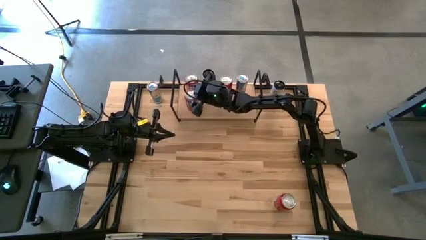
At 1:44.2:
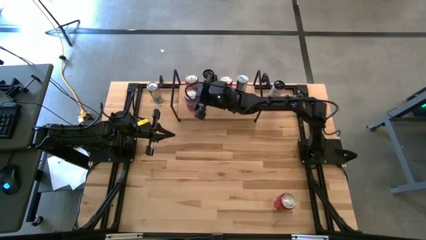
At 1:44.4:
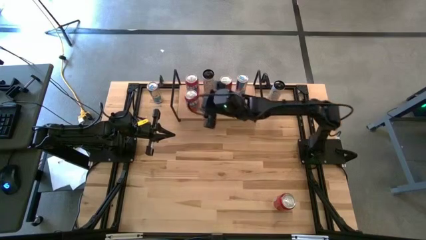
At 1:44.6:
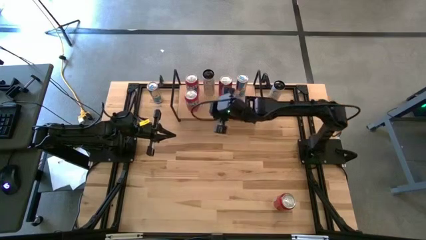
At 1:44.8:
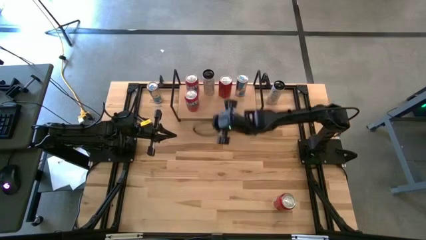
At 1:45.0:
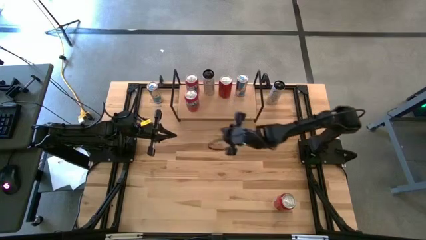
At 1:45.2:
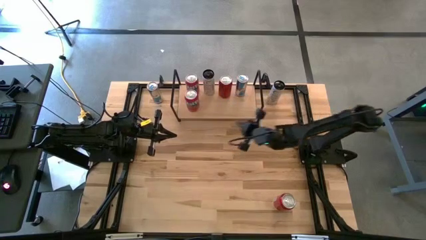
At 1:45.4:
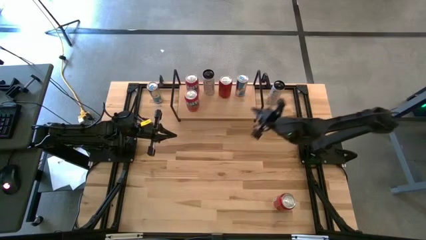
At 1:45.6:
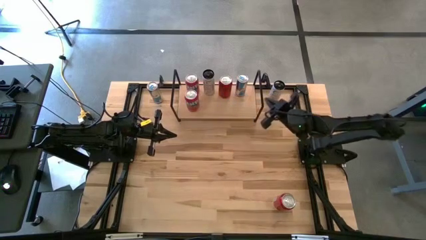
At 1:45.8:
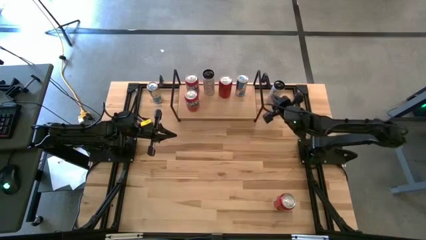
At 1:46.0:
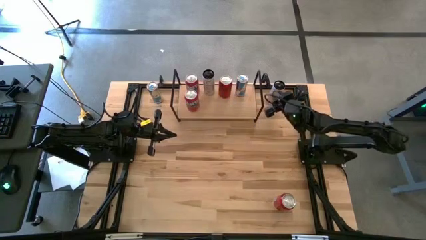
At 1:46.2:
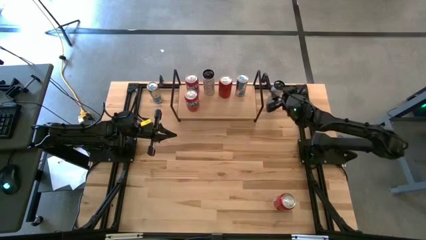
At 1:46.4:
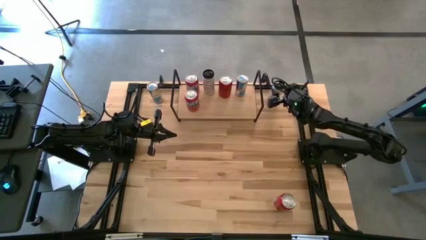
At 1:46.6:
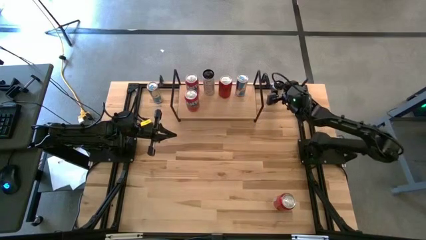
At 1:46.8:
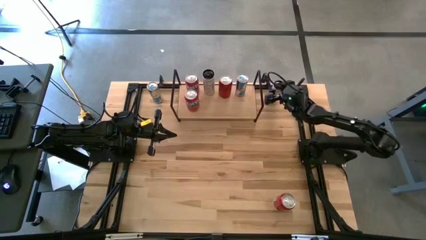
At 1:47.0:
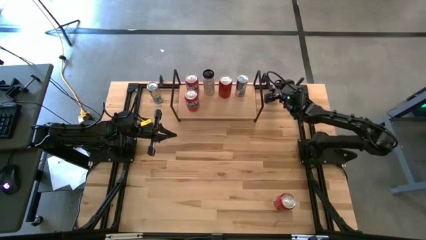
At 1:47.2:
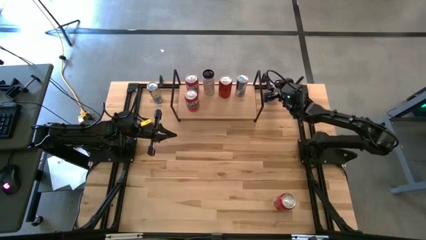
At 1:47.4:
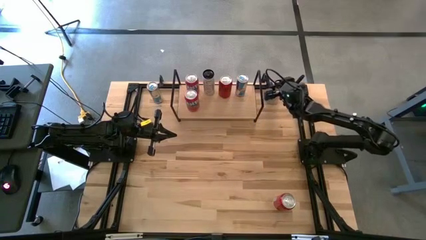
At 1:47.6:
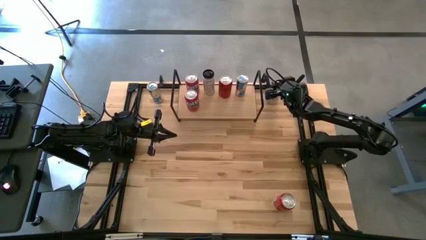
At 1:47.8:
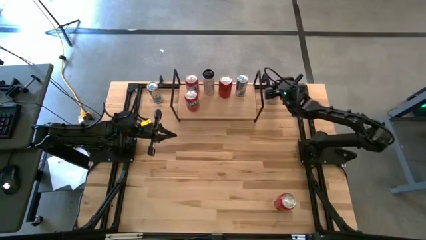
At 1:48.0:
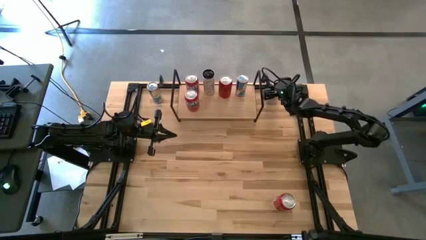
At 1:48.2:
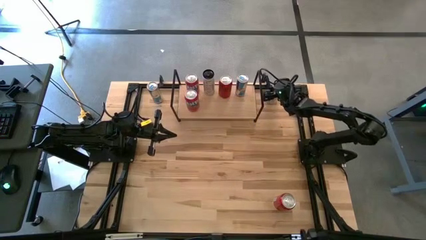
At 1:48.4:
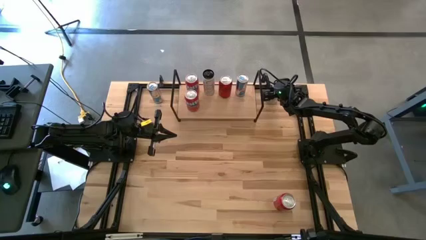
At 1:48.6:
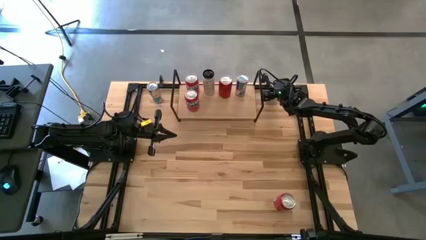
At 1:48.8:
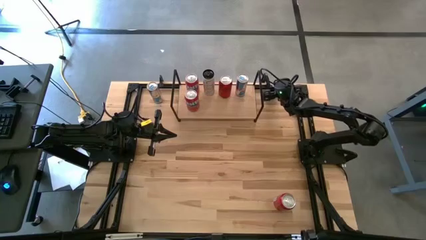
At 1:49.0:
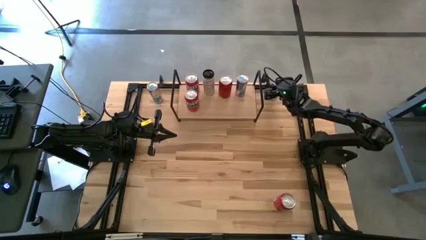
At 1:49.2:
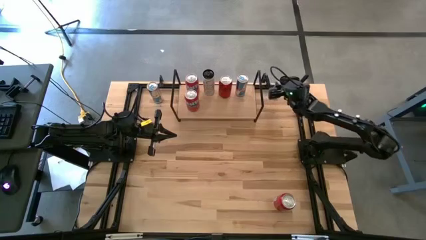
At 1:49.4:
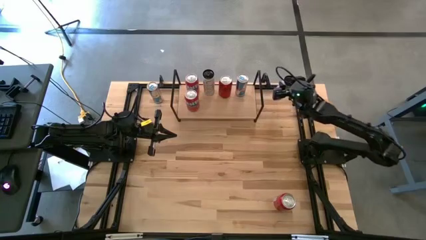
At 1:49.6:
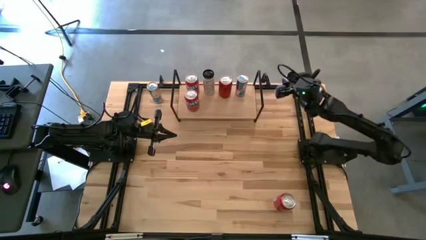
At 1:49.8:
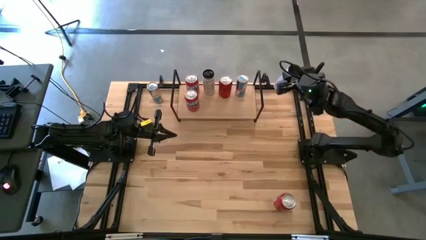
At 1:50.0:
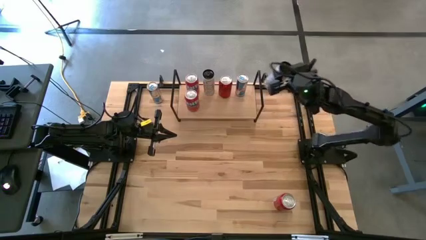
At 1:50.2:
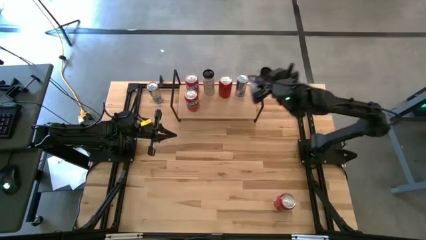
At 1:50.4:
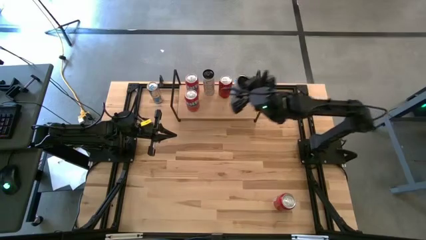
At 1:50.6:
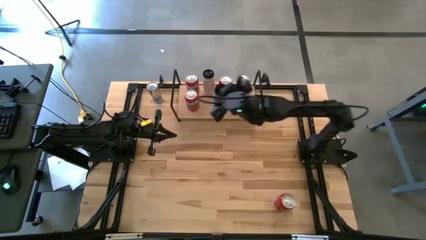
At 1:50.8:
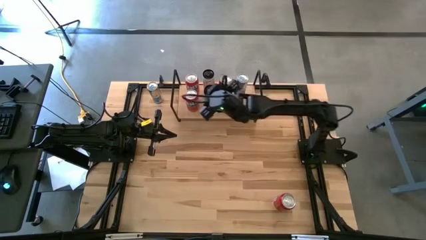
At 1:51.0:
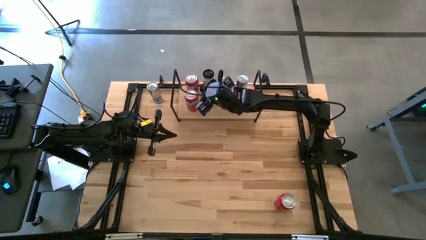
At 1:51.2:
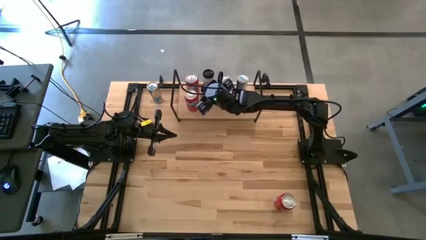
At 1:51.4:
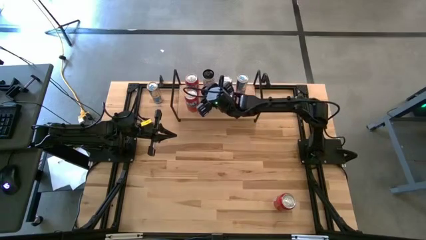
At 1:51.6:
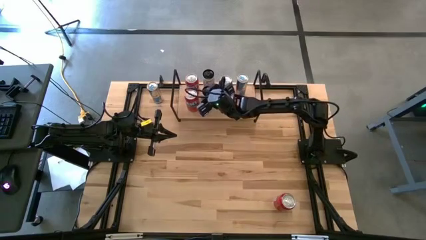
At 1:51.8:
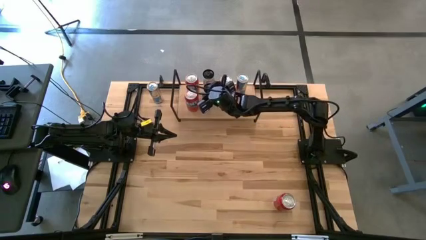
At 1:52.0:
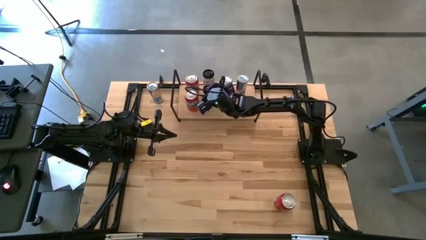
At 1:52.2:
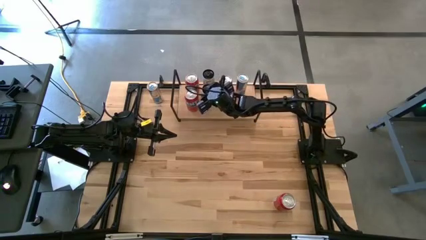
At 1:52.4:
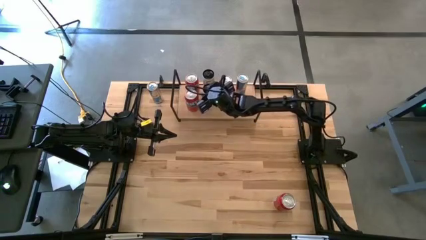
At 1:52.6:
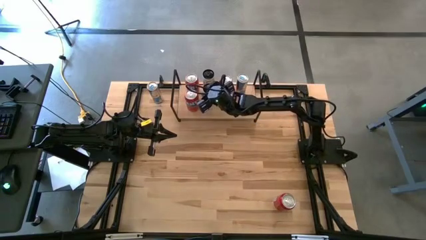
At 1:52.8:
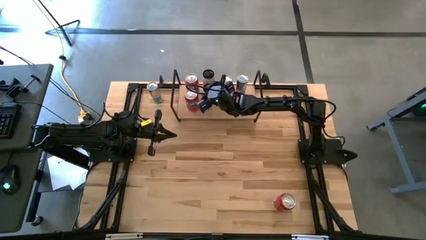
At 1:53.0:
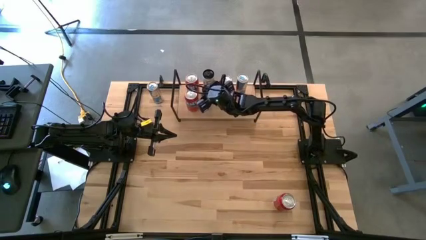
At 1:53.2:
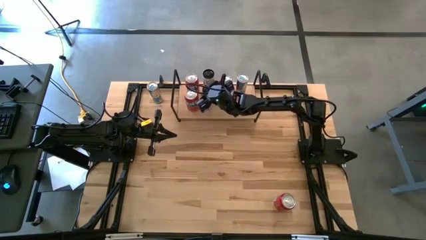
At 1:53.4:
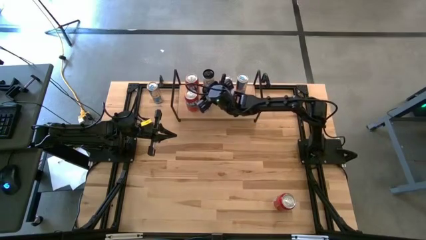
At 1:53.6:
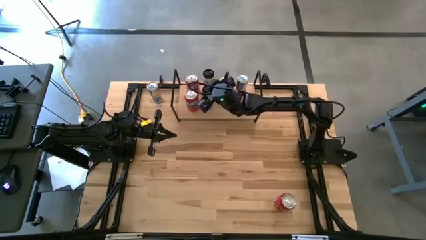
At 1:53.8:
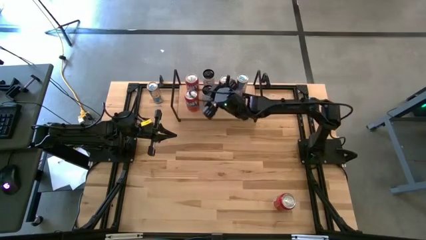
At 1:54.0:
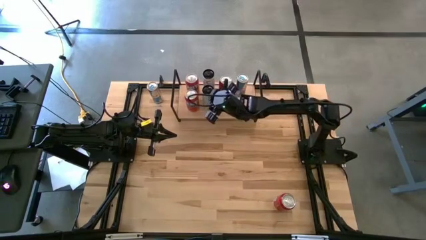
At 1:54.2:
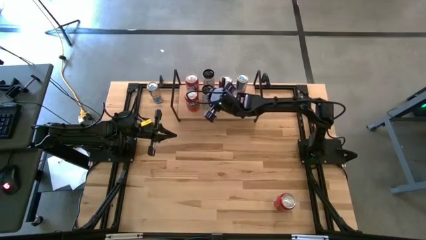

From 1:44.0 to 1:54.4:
Task: Place canned beverage on shelf
Put the white yellow soda can on the shelf aligned with the white yellow soda can

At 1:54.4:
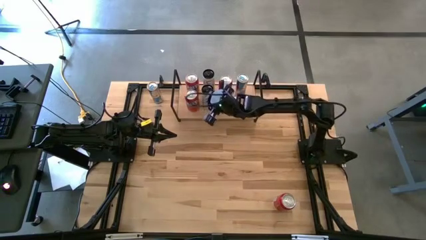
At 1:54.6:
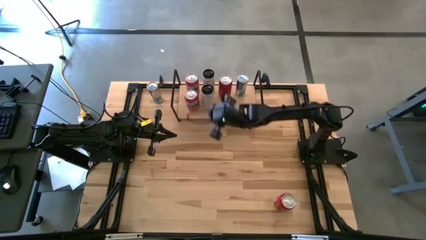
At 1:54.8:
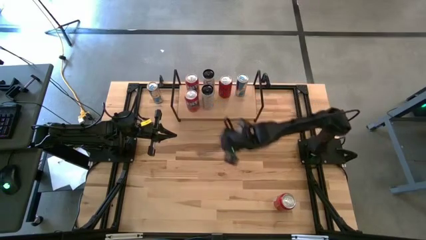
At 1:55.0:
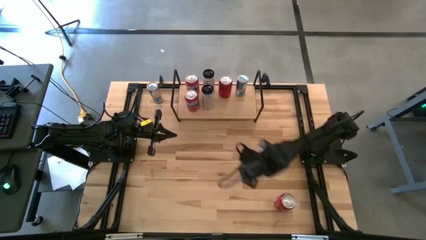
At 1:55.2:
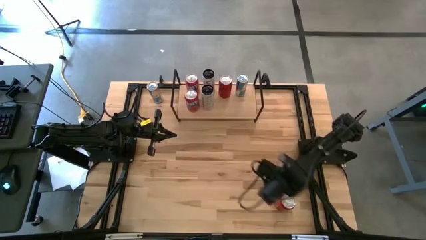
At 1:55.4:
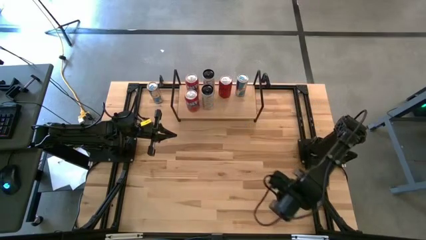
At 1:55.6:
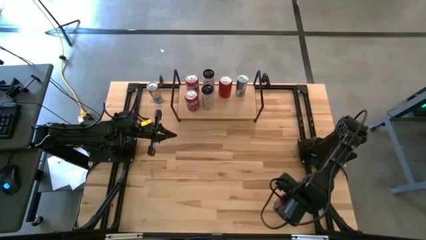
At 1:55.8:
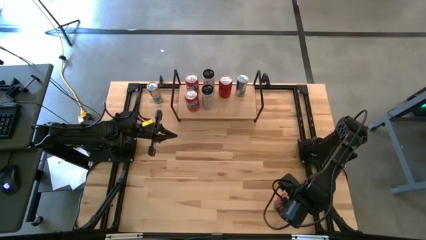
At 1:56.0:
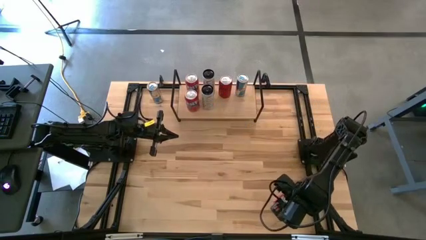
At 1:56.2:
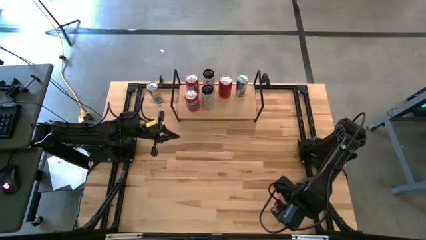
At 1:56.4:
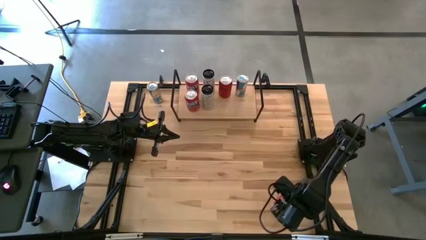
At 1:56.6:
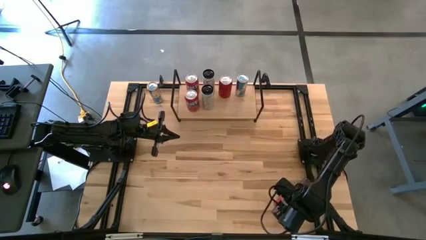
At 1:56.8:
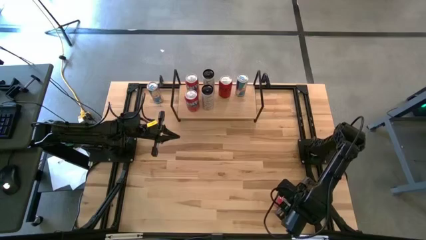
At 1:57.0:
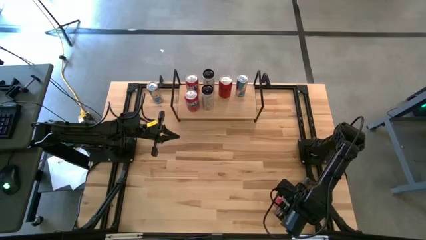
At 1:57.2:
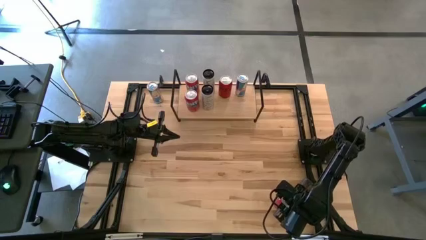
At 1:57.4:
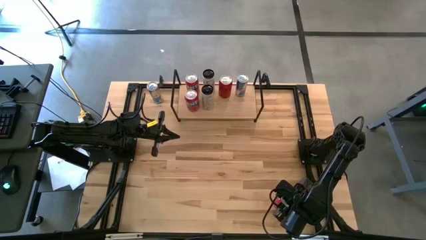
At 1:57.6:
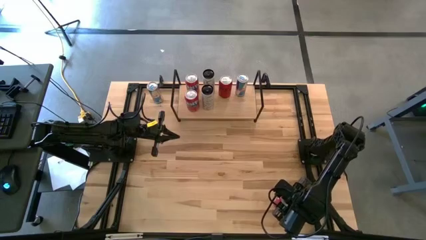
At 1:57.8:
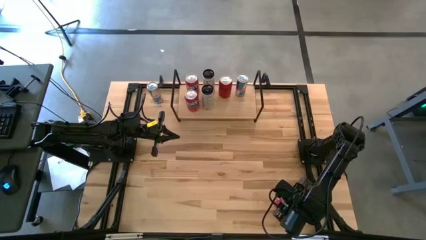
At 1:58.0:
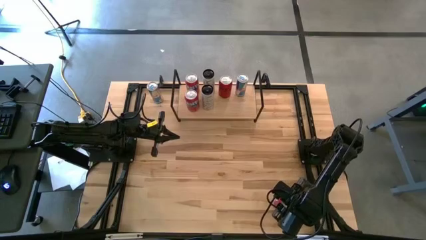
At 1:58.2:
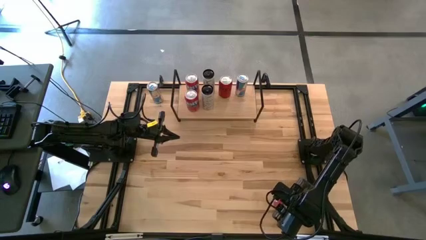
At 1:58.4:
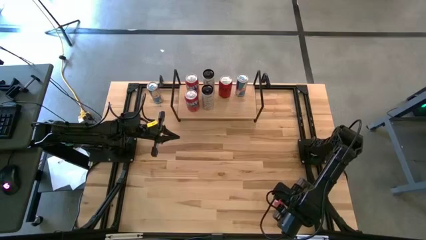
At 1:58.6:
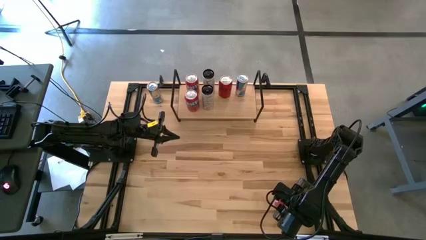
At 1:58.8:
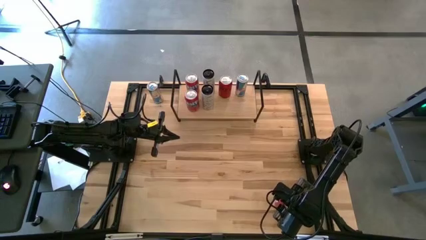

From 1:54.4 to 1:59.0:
Put the red black soda can on the shelf aligned with the red black soda can
